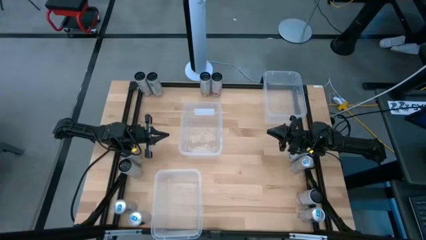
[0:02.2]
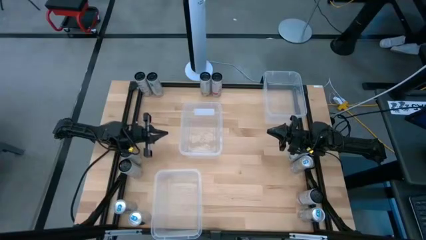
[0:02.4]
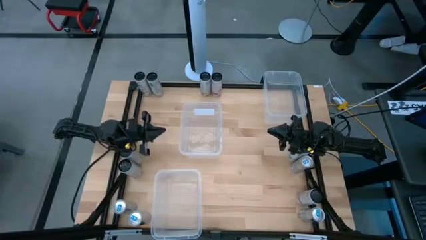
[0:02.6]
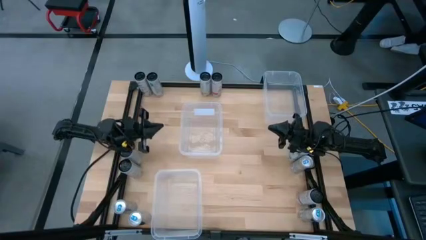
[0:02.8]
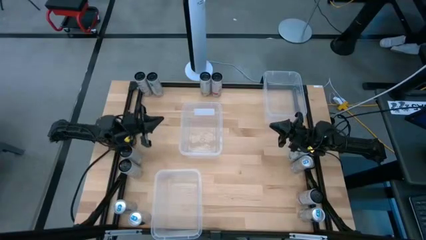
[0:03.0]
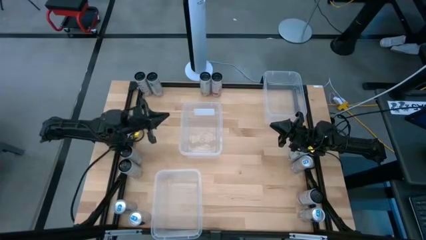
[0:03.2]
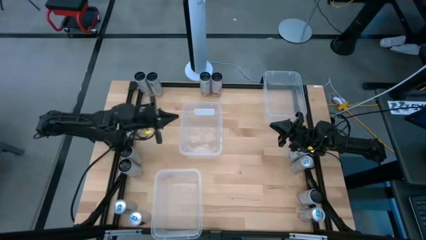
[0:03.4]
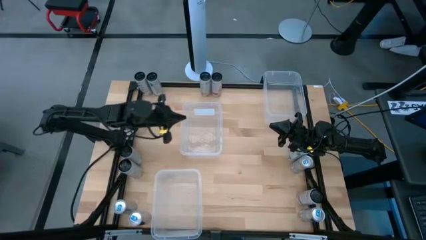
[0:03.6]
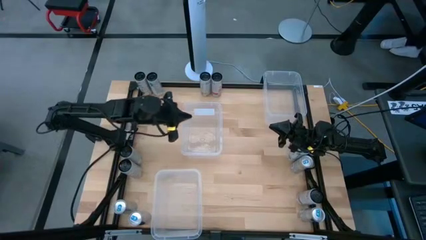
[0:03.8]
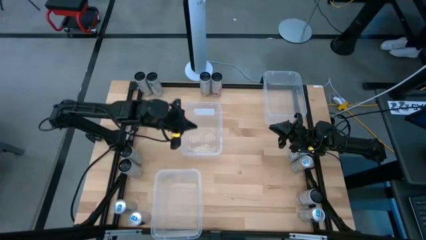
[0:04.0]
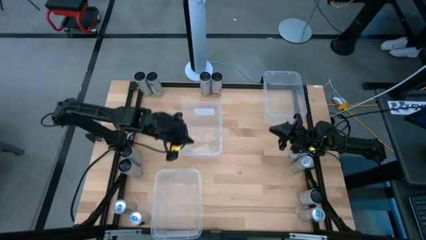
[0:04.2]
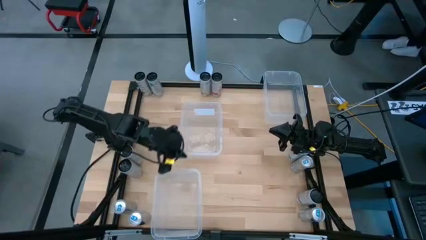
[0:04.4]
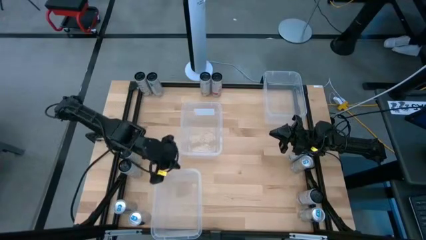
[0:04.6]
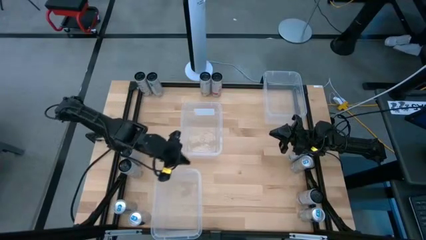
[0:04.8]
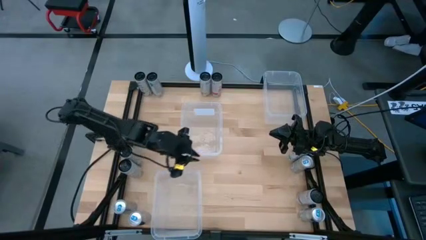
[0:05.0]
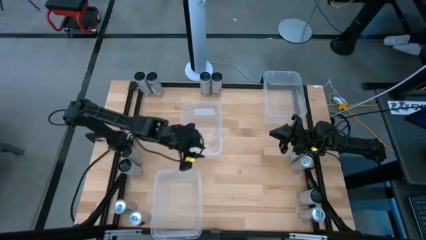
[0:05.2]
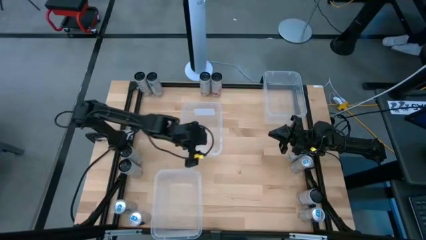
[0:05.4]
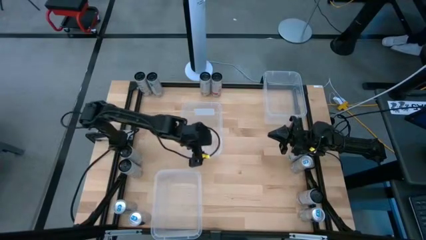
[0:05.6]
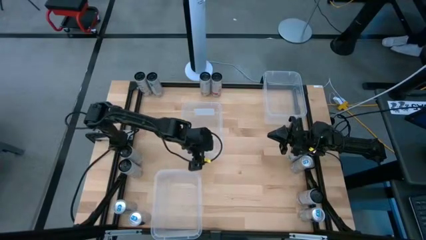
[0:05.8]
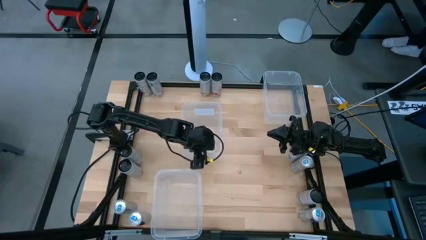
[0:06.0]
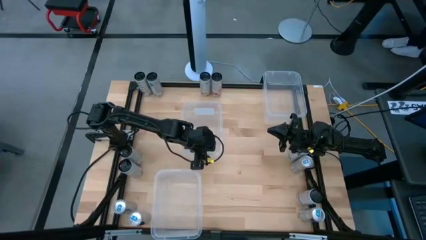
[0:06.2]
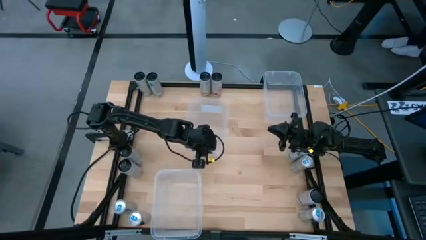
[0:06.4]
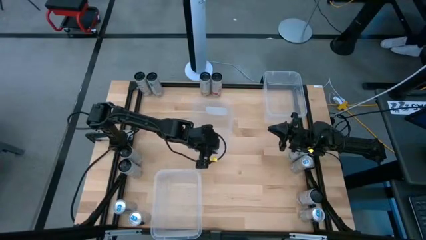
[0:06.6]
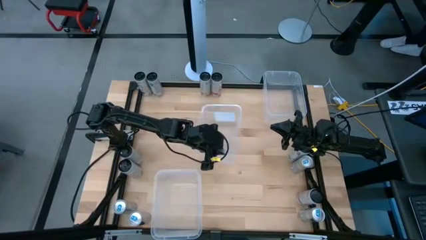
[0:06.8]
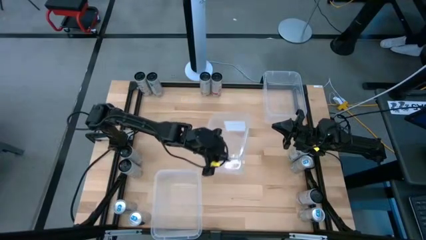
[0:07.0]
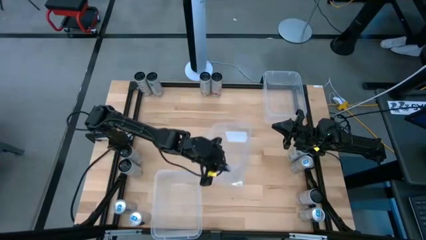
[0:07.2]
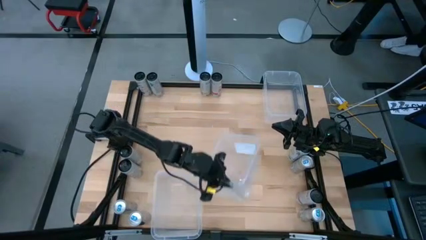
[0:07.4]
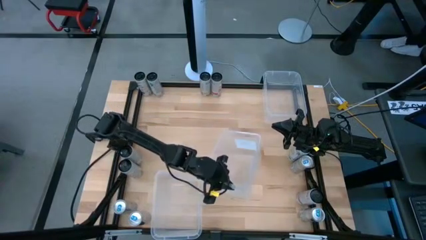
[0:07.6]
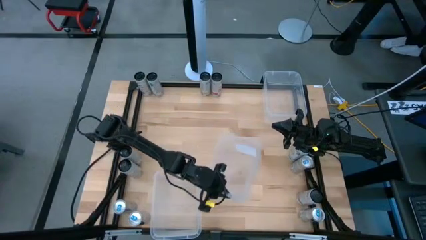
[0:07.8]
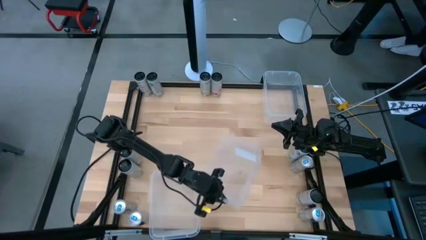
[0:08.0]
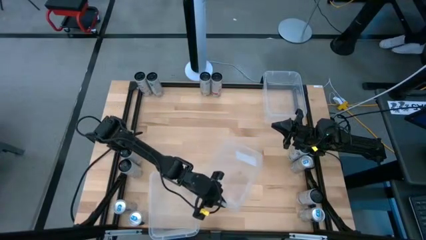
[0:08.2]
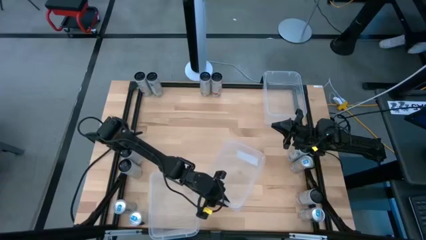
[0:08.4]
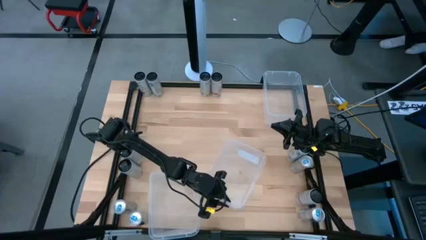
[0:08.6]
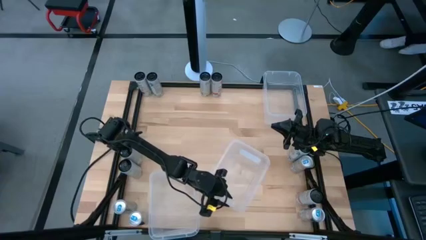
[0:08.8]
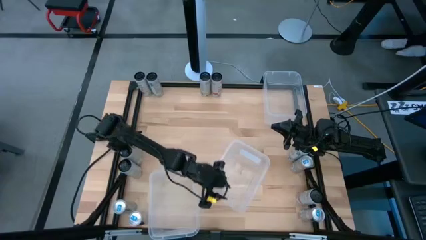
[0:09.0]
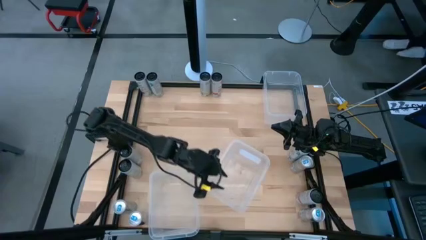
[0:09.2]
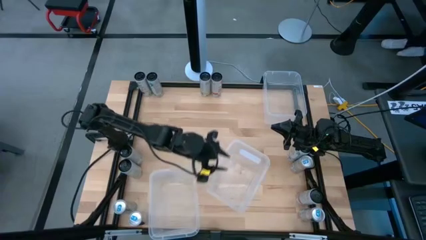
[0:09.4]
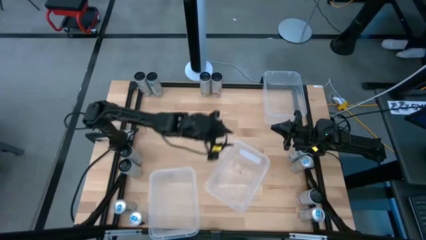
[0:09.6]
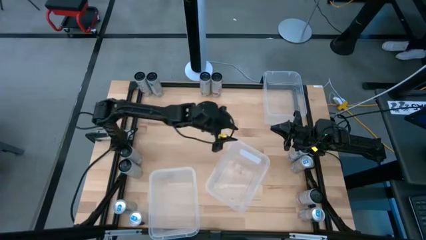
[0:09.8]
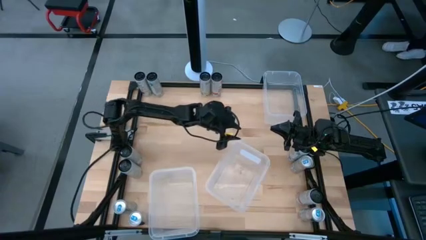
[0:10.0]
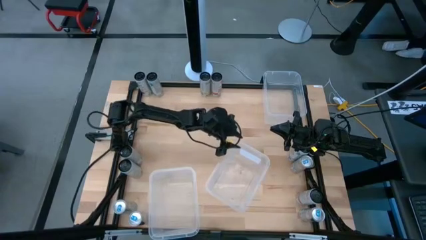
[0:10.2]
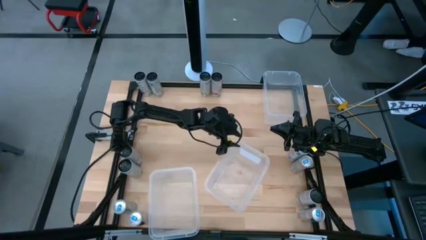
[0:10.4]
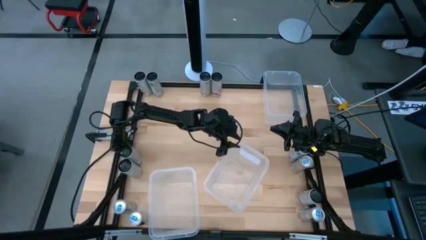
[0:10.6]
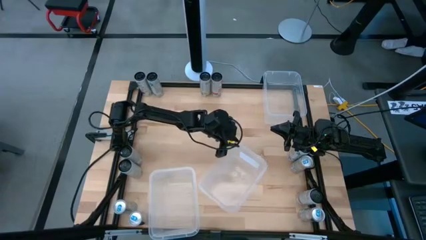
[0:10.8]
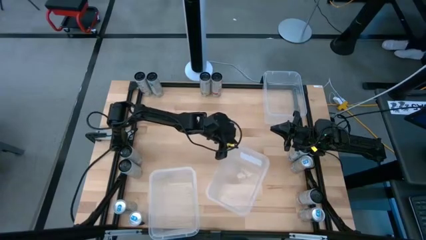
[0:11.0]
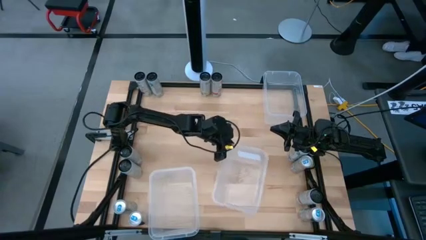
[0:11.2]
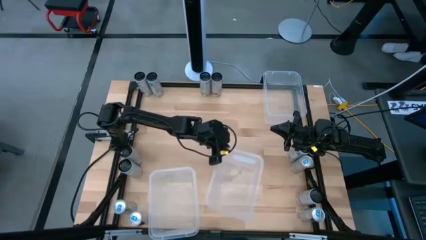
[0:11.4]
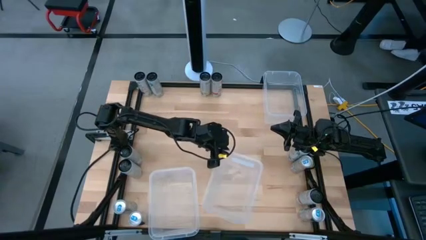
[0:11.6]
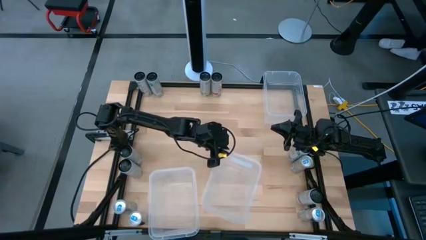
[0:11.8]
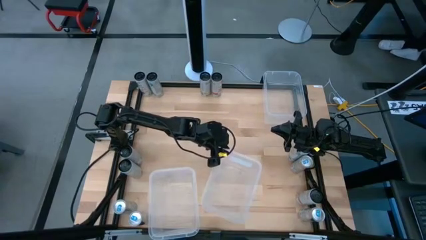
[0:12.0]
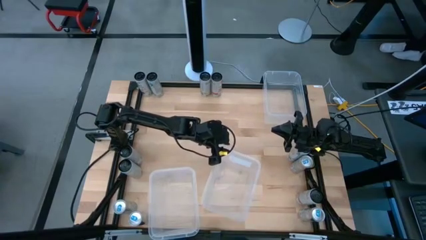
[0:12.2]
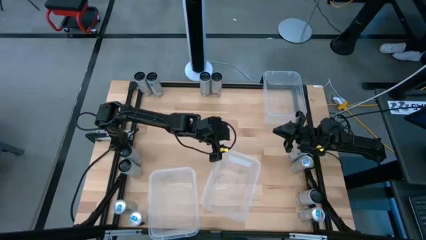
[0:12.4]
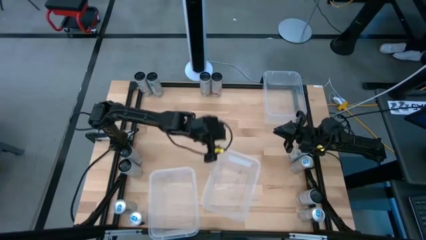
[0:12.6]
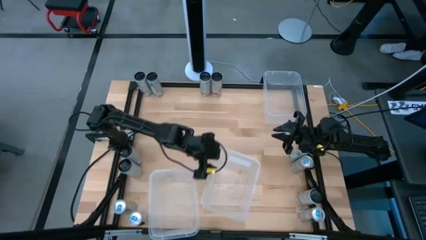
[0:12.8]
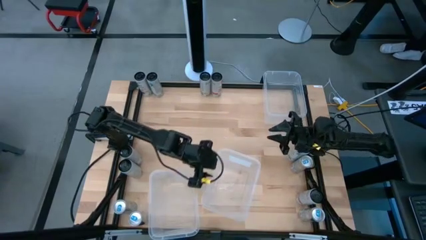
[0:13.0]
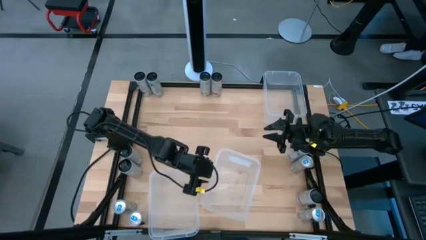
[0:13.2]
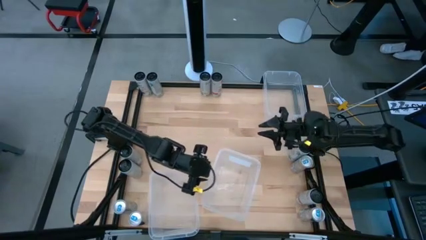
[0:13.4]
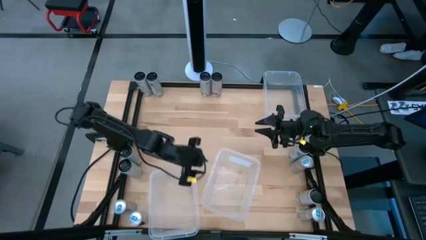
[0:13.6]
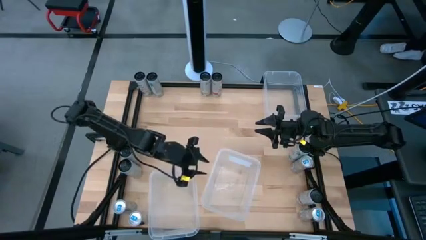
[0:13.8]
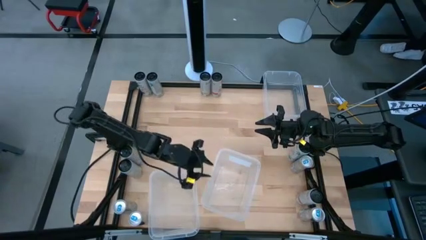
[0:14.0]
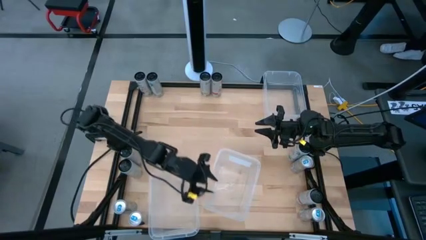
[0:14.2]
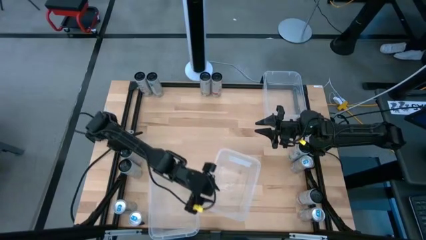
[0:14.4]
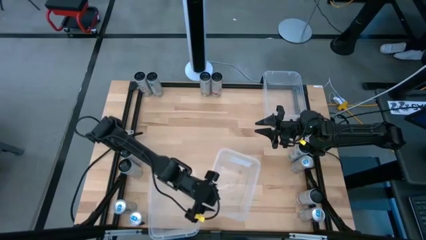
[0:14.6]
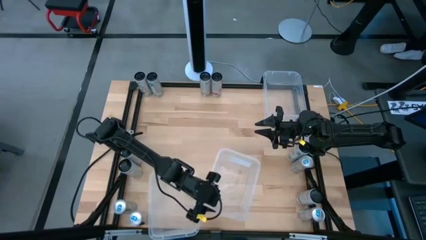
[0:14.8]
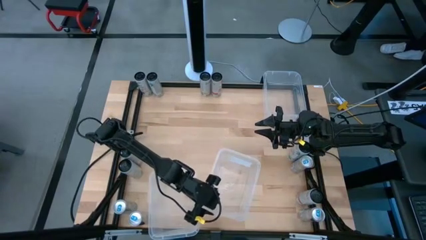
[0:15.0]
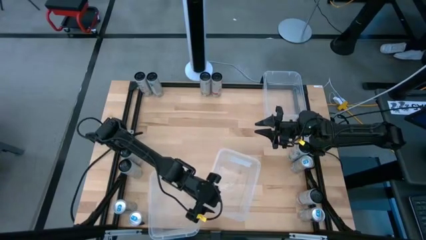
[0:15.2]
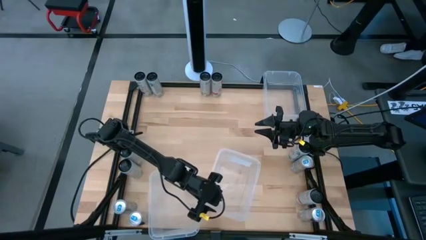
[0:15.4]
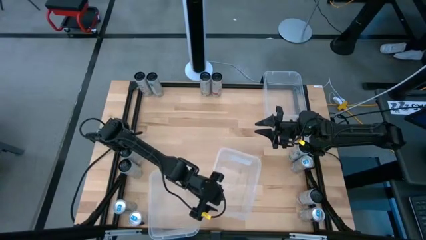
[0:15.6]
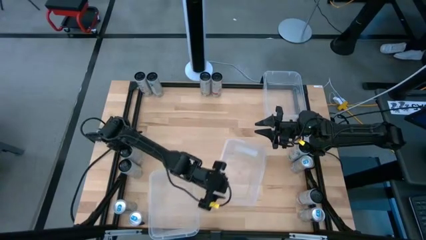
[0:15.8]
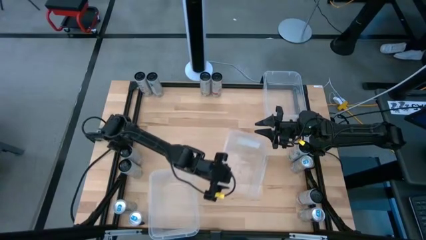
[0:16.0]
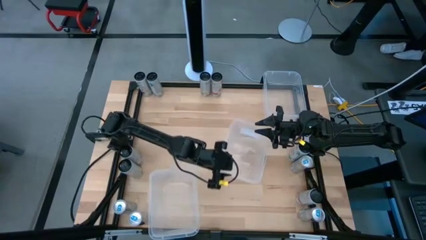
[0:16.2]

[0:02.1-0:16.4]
Task: Sort soda cans
Move middle left bin to the center of the table
